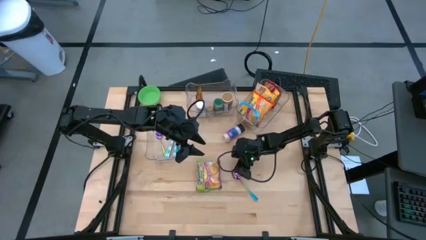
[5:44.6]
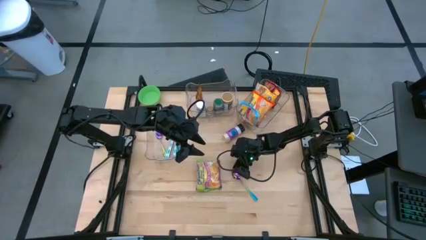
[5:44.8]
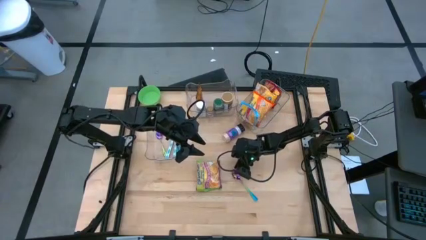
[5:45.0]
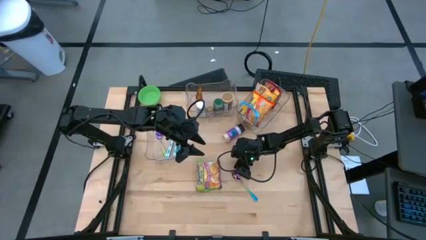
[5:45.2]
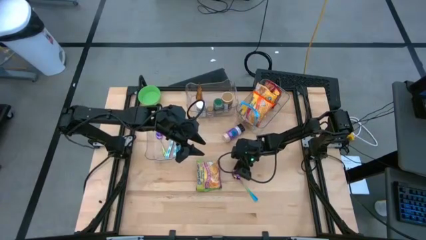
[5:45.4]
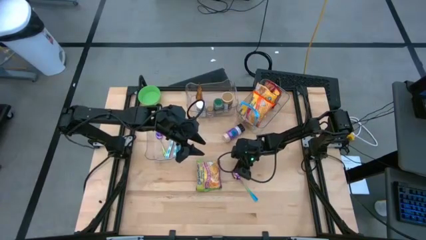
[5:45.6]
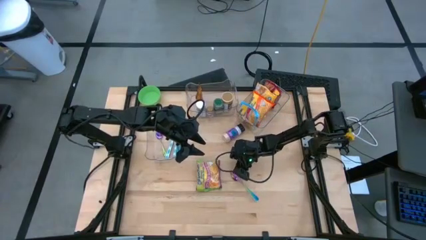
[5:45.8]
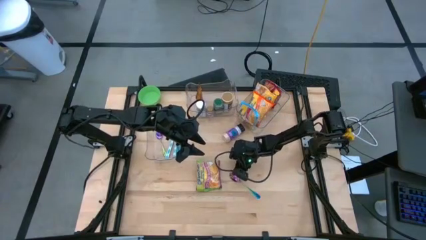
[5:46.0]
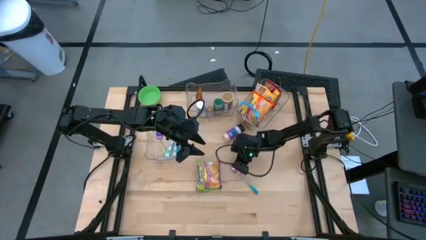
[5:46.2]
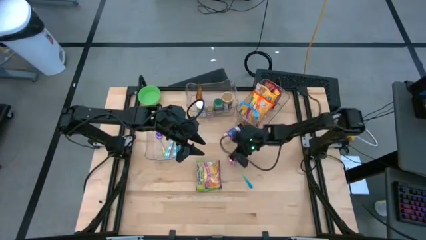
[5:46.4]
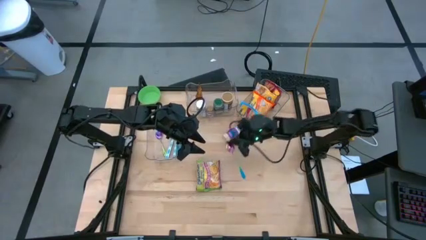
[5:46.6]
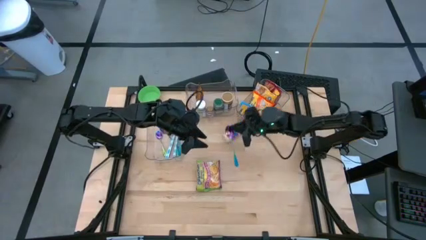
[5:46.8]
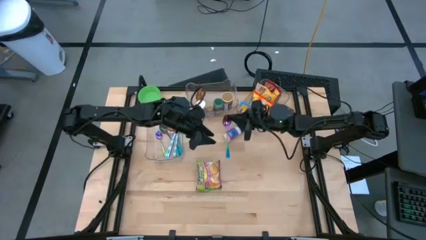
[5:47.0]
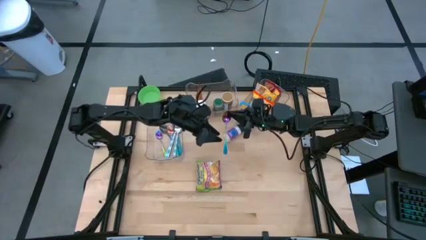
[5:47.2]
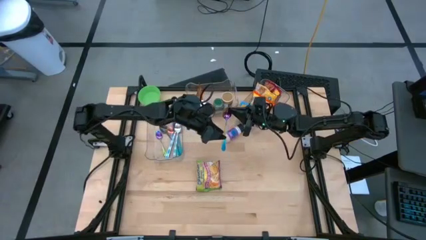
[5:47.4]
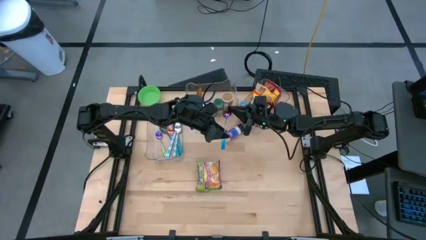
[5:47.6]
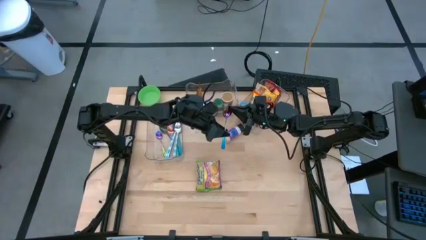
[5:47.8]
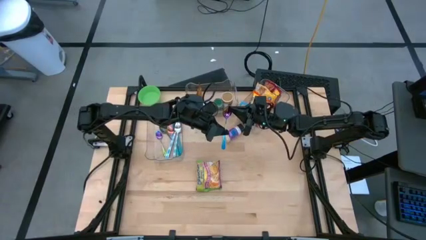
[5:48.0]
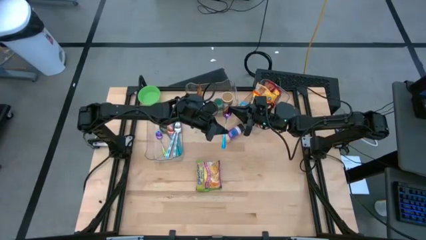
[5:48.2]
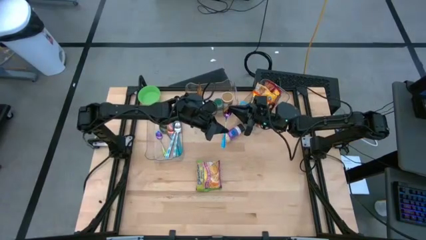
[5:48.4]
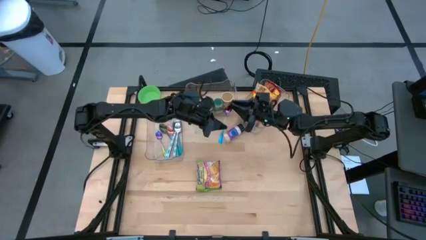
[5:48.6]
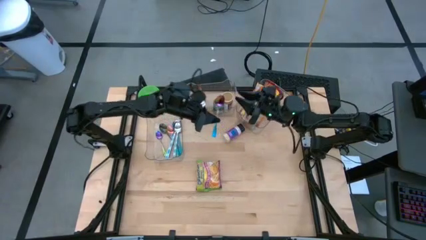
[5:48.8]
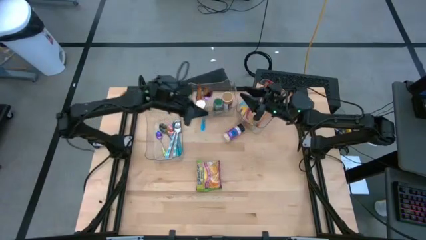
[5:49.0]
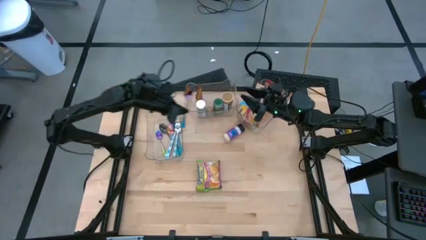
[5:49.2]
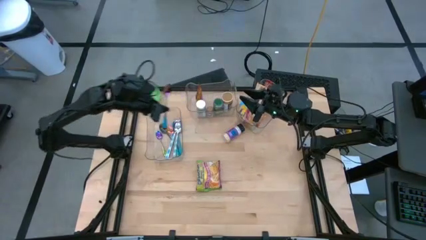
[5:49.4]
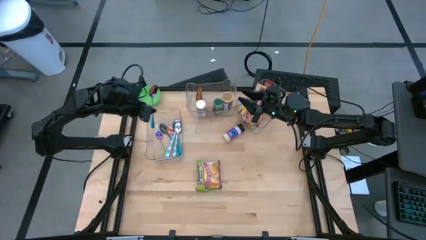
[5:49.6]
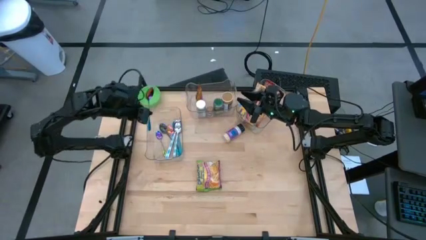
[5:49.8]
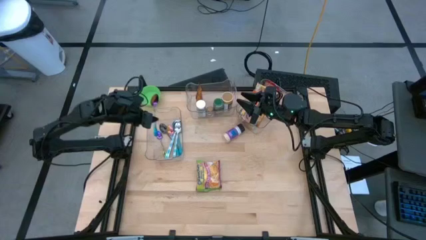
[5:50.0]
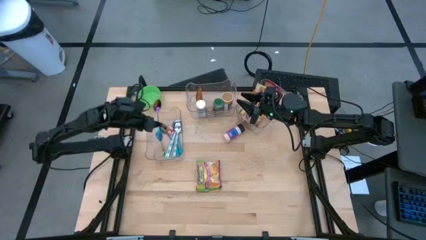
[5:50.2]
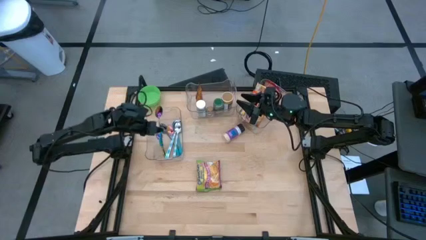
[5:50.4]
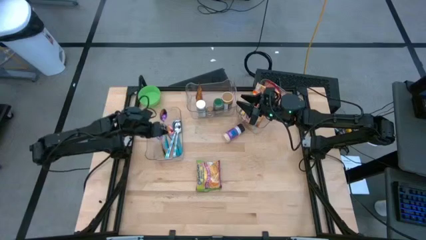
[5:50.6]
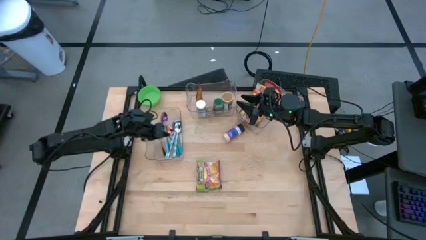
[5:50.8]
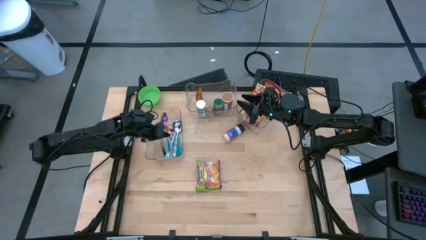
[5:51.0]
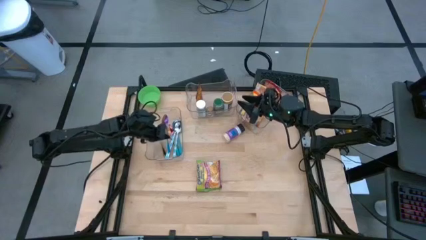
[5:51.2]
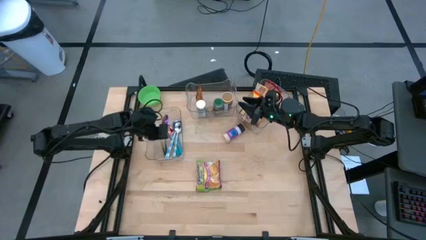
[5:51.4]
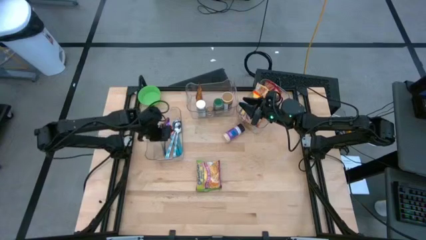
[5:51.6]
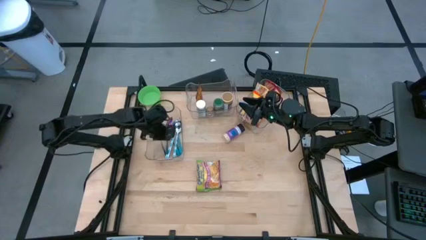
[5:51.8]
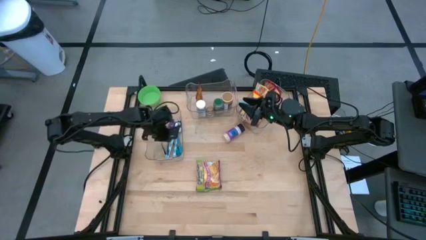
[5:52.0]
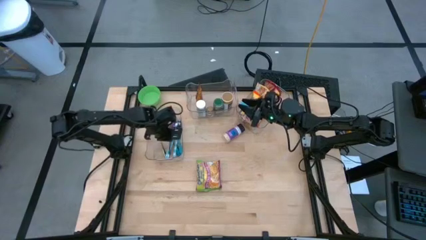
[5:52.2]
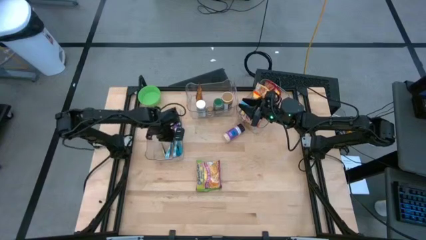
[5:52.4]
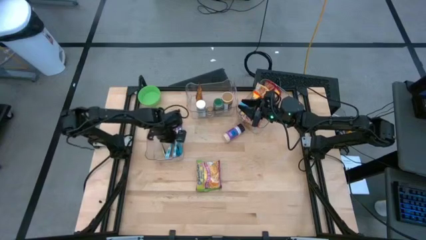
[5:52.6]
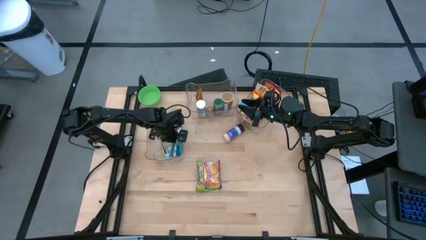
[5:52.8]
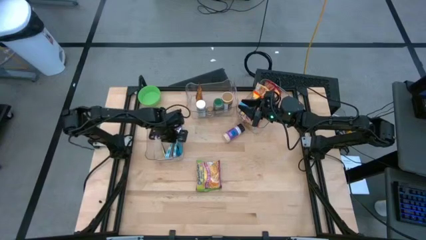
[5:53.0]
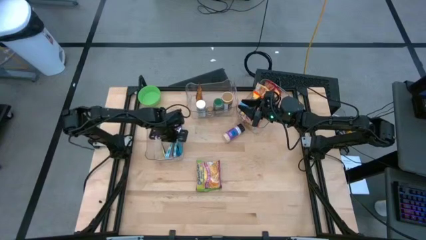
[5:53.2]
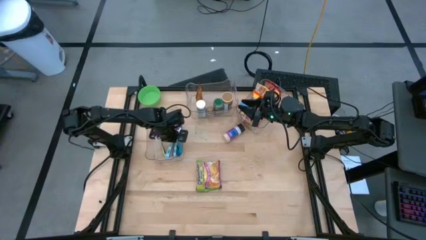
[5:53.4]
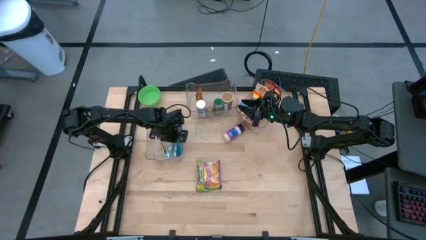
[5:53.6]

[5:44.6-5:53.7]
Task: Pick & Place Food Item
Put the violet spoon into the left transparent bin

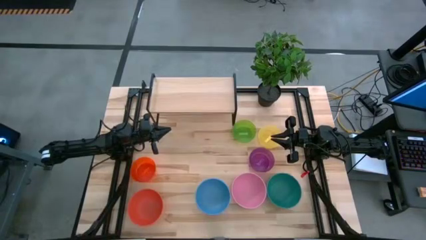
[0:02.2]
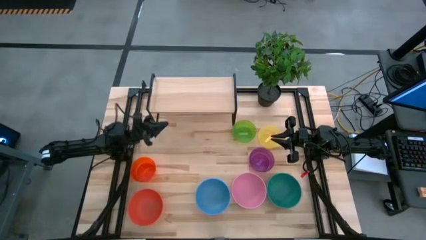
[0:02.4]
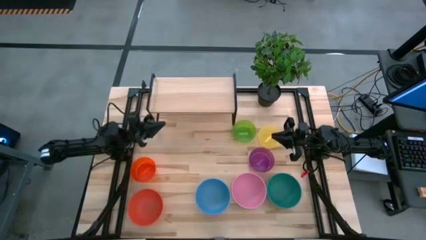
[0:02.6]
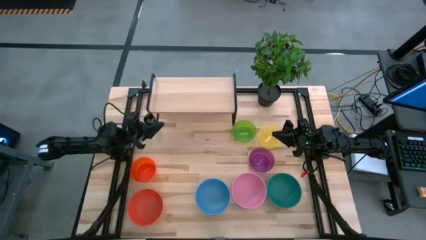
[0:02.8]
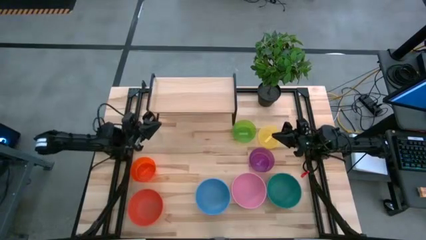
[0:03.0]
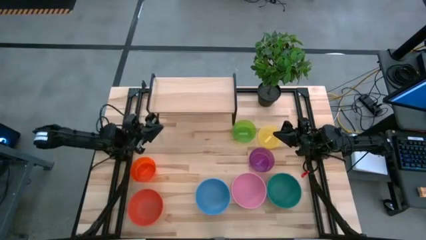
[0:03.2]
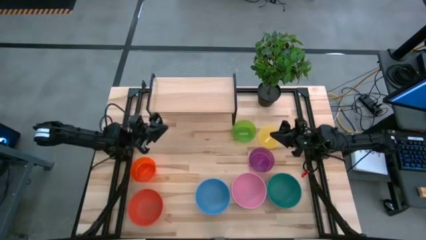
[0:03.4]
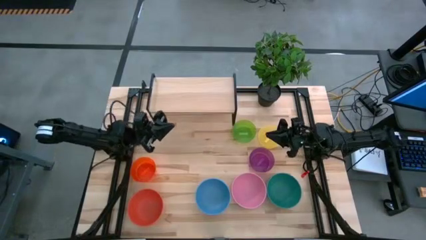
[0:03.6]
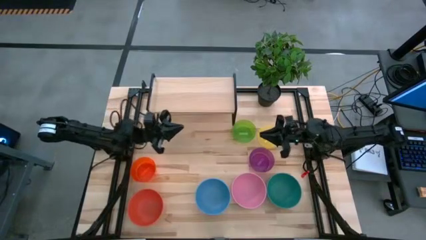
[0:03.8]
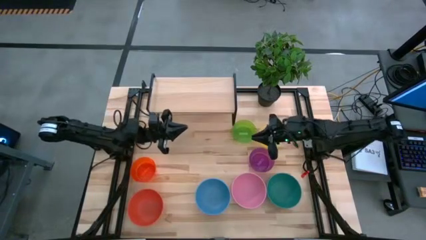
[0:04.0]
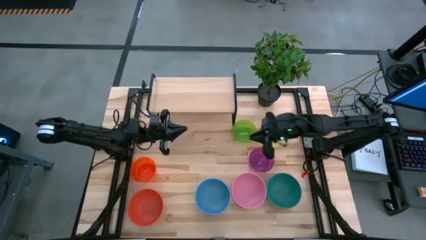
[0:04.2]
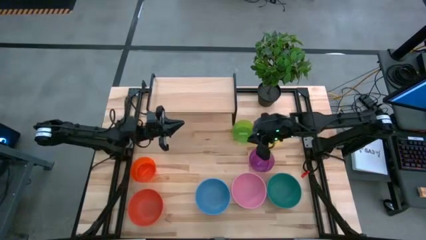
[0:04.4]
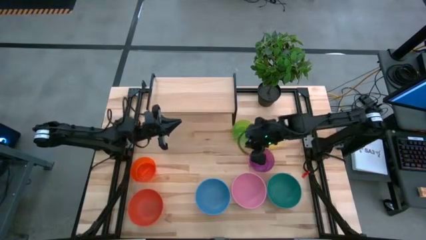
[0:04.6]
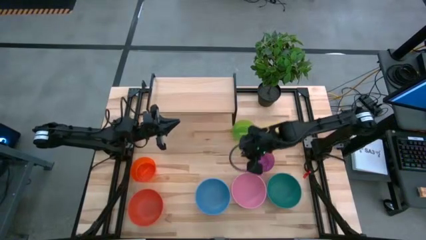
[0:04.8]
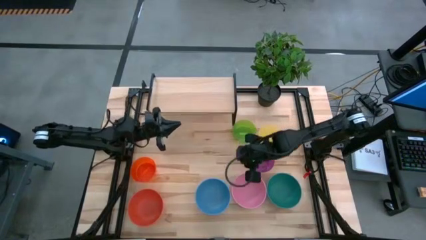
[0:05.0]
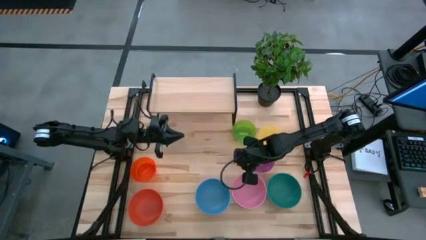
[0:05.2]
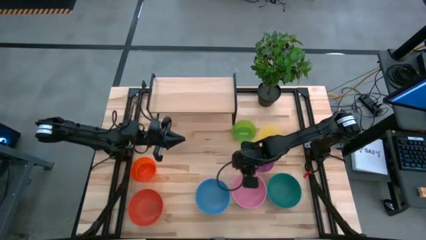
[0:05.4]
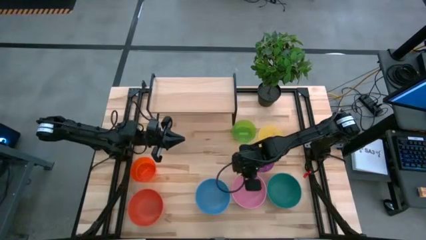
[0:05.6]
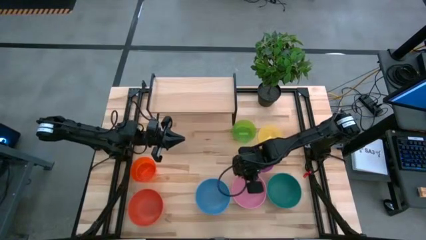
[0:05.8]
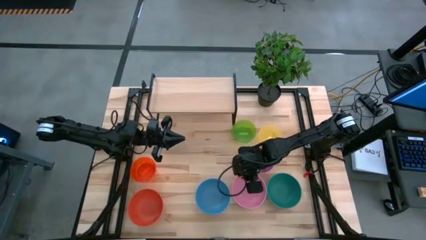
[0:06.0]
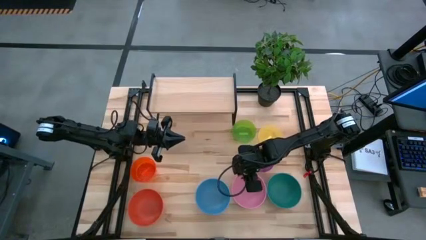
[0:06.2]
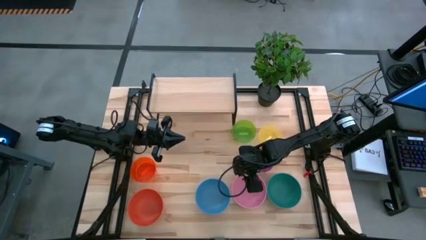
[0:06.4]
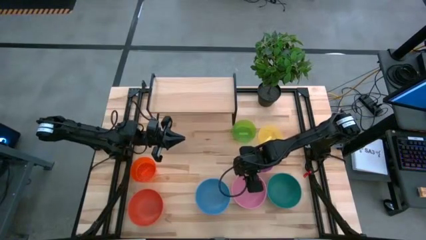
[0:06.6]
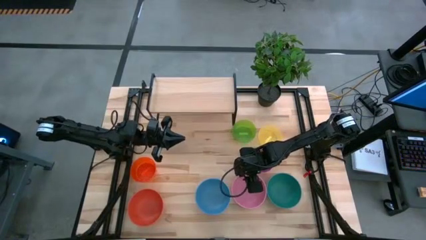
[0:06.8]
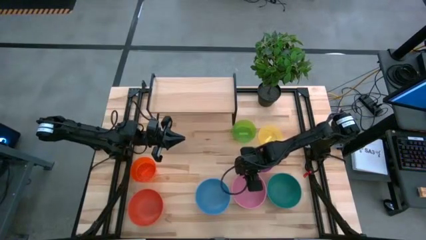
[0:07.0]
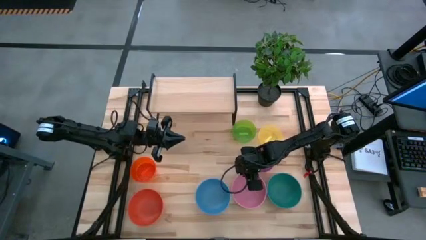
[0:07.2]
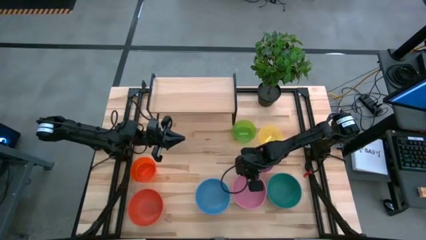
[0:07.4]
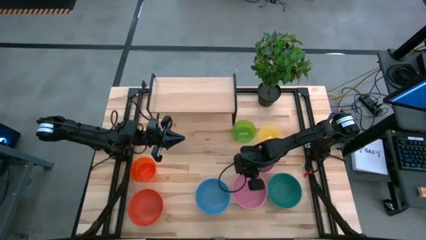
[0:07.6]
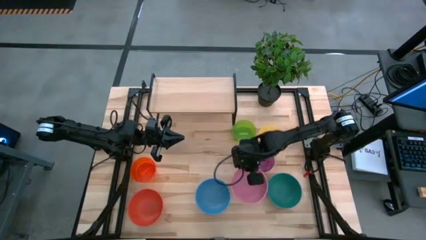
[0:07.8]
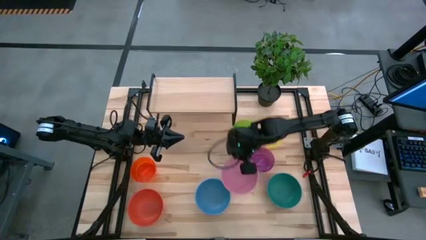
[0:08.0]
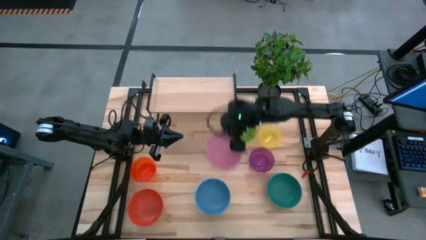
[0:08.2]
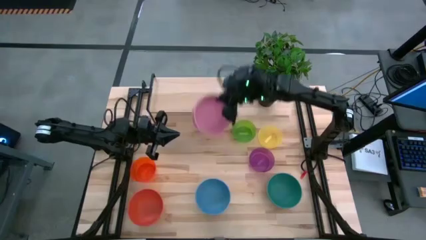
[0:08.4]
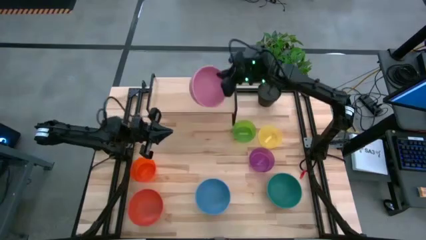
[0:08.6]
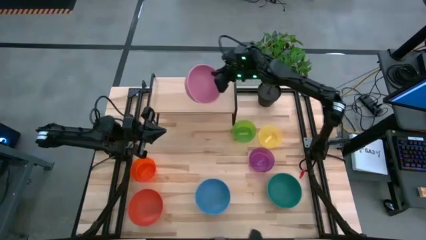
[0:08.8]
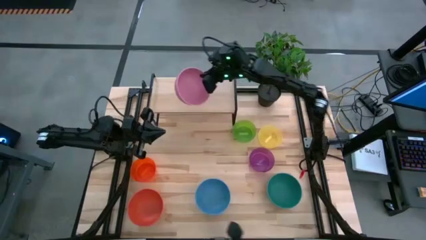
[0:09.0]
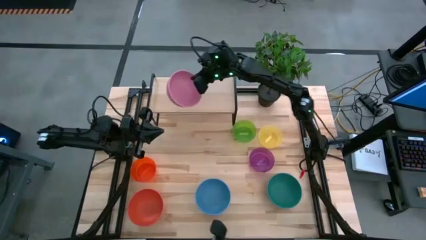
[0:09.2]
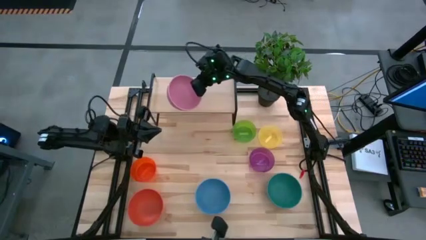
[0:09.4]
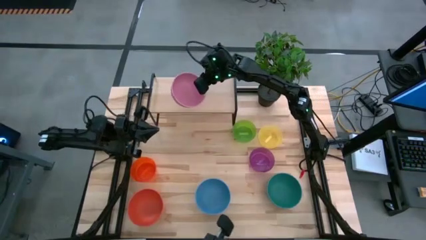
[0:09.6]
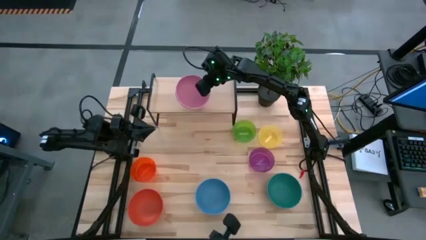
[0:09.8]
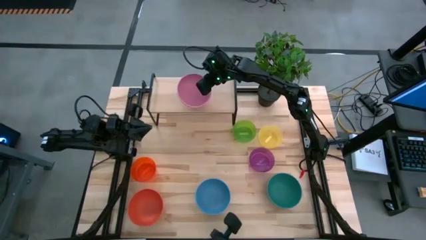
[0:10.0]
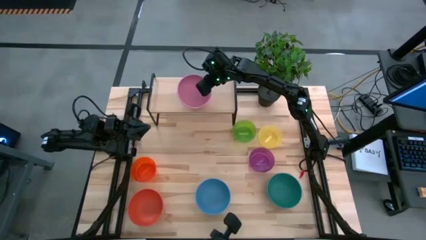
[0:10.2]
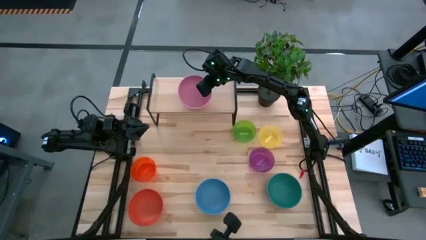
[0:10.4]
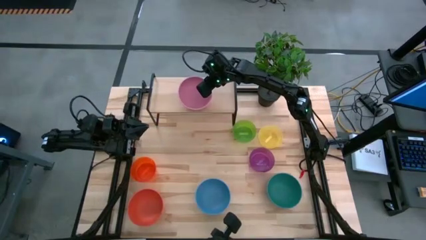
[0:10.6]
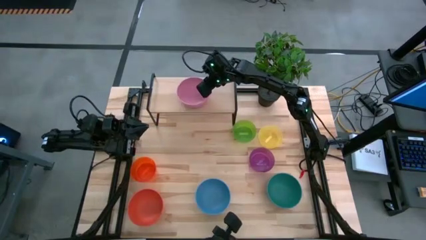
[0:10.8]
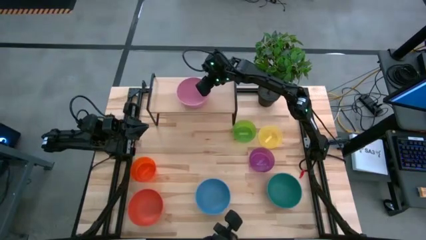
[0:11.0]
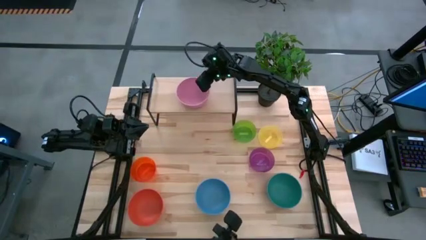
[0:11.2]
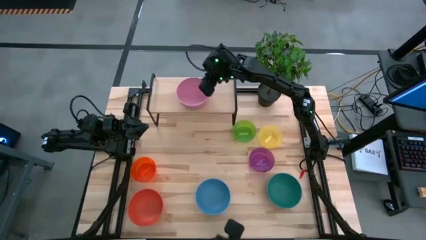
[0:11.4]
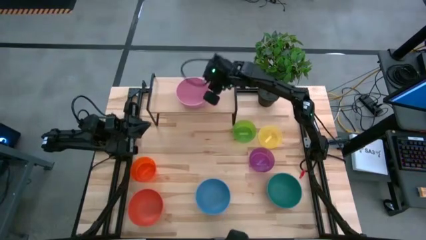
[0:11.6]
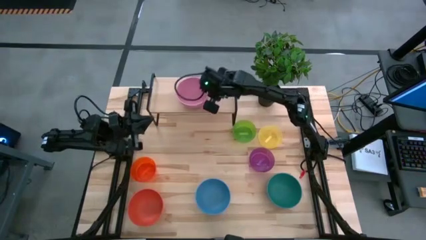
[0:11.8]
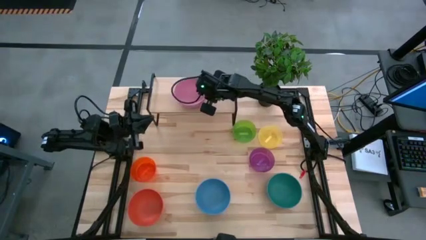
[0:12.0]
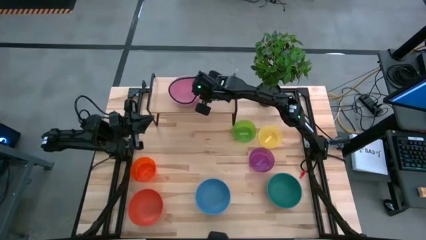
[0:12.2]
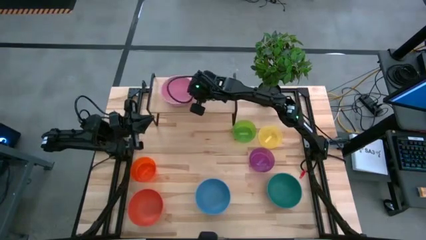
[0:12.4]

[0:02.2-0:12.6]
Task: Place and stack bowls onto a shelf
Put the big pink bowl on the shelf
